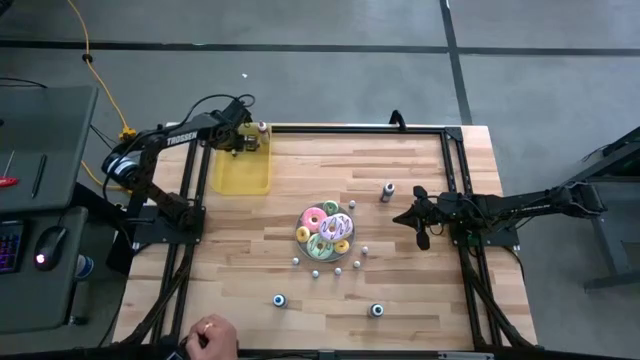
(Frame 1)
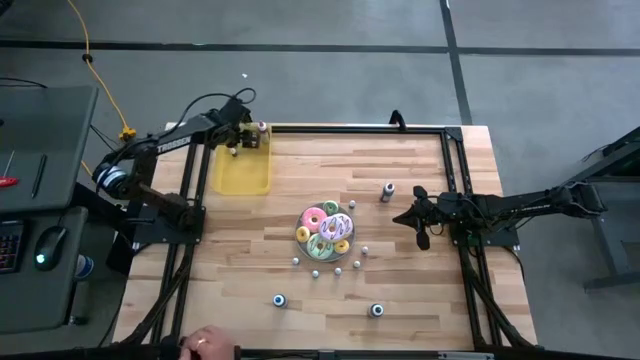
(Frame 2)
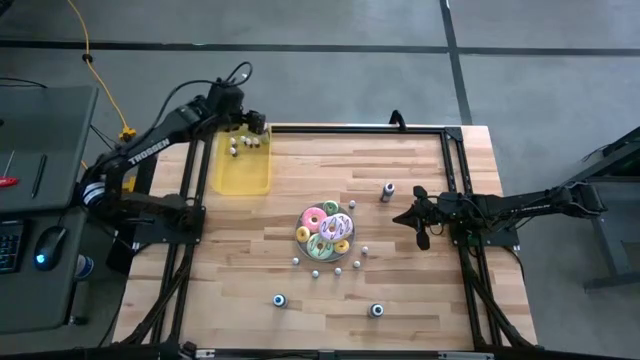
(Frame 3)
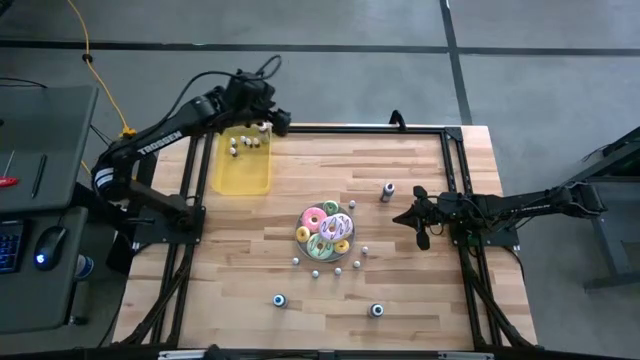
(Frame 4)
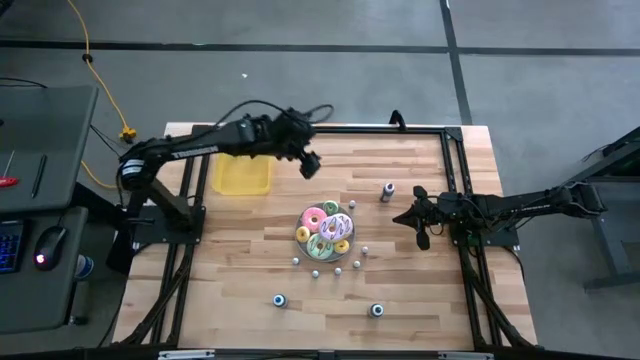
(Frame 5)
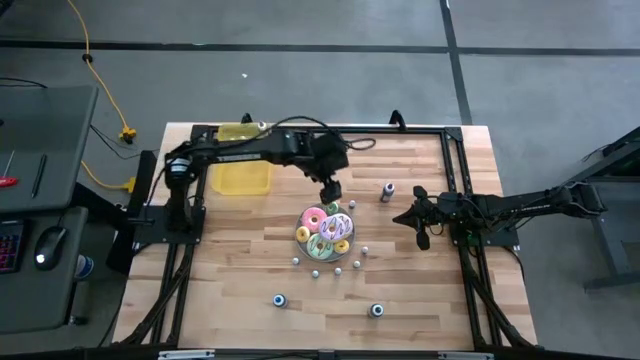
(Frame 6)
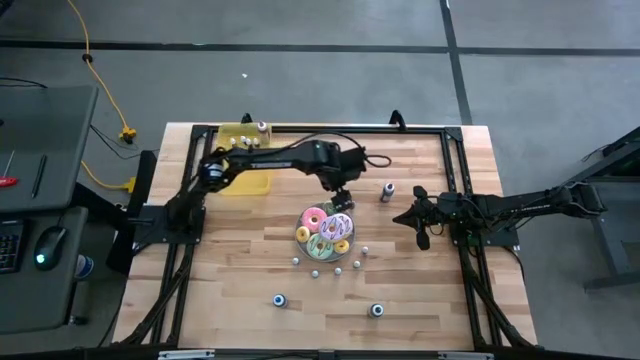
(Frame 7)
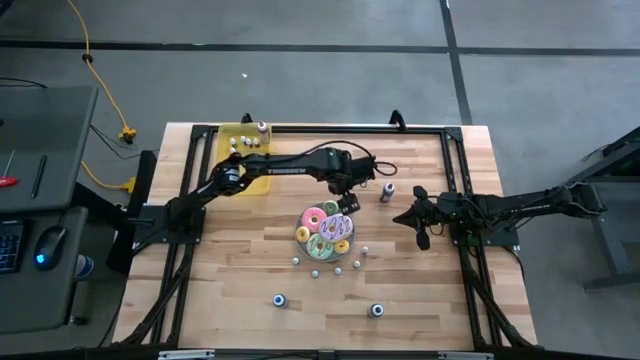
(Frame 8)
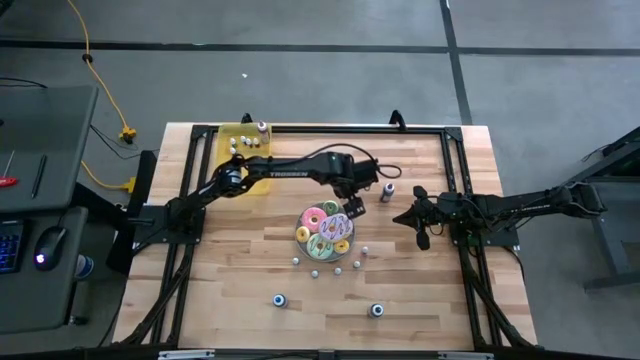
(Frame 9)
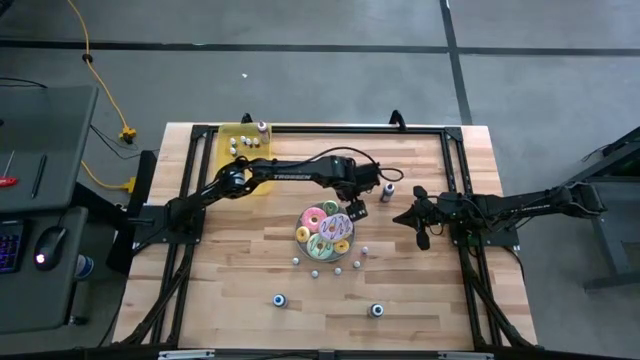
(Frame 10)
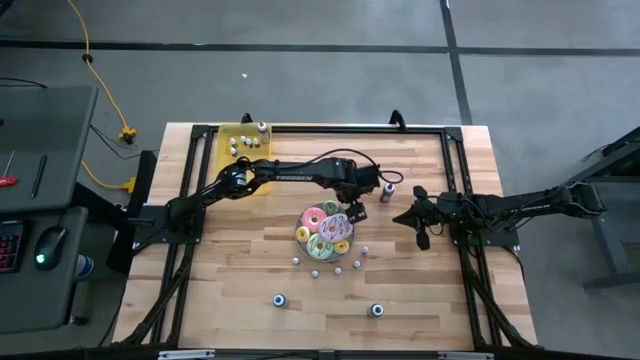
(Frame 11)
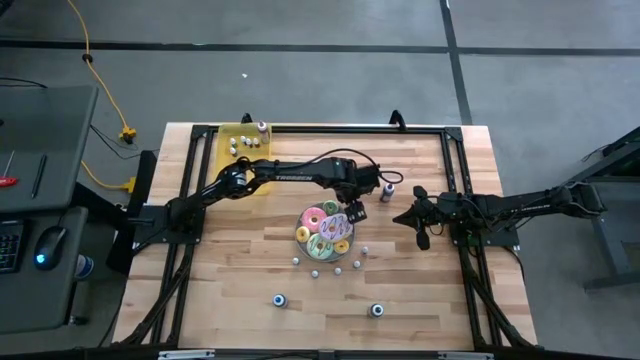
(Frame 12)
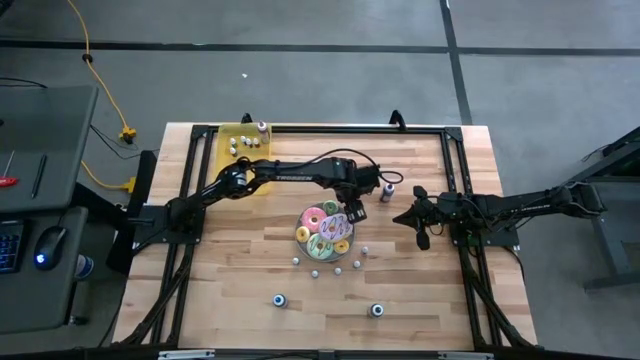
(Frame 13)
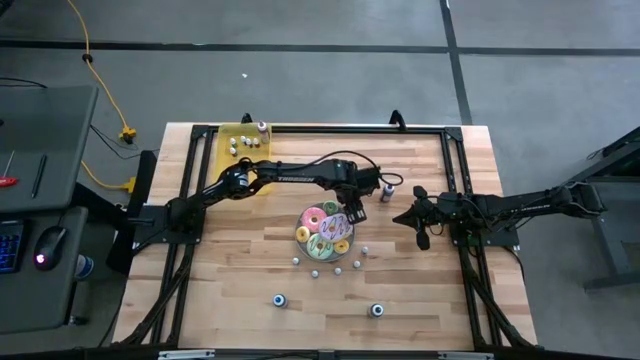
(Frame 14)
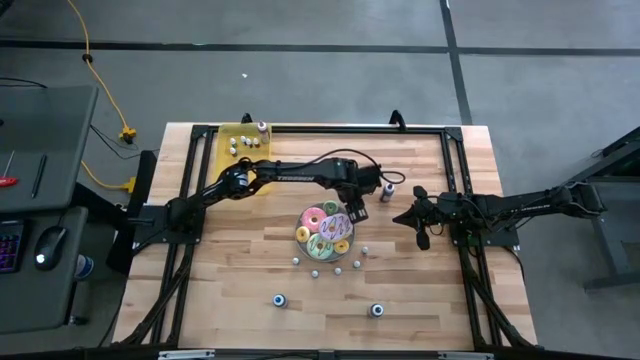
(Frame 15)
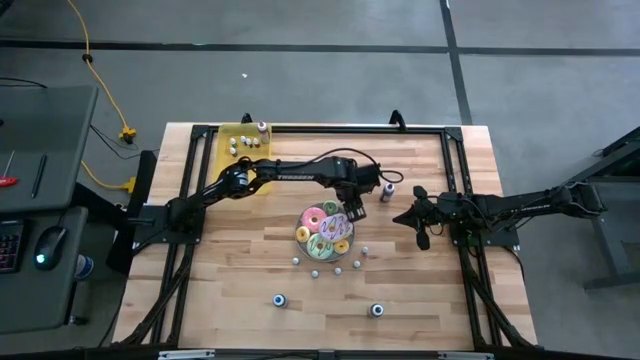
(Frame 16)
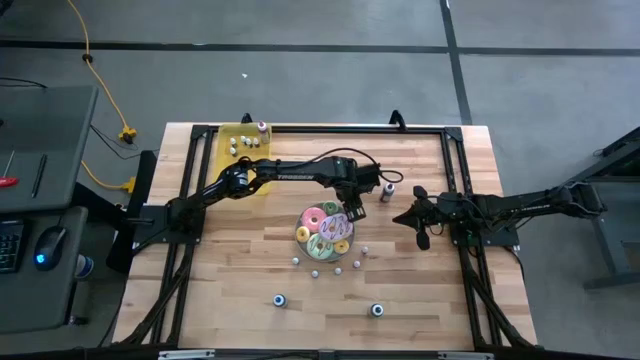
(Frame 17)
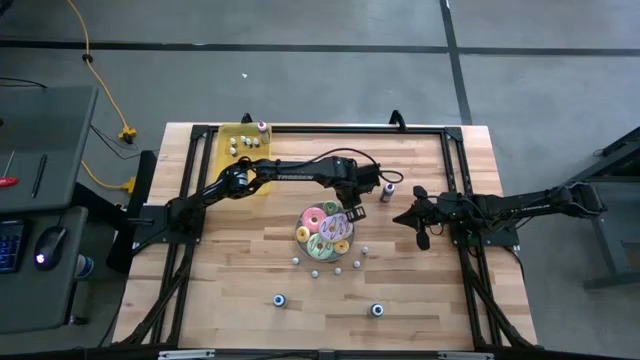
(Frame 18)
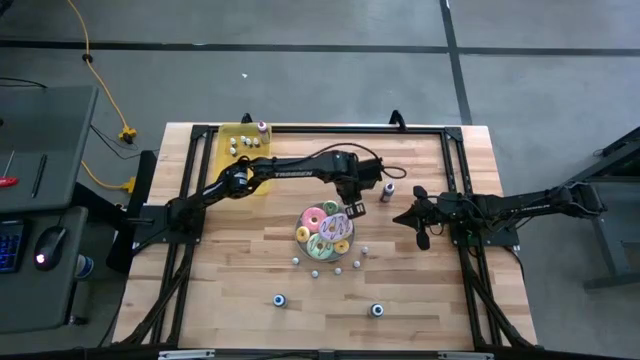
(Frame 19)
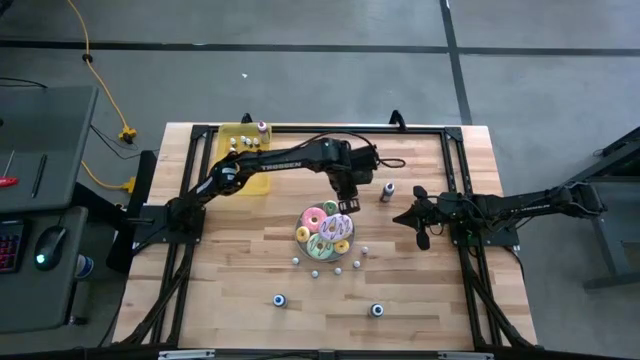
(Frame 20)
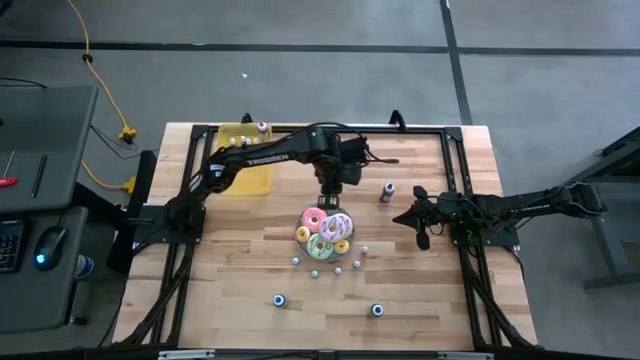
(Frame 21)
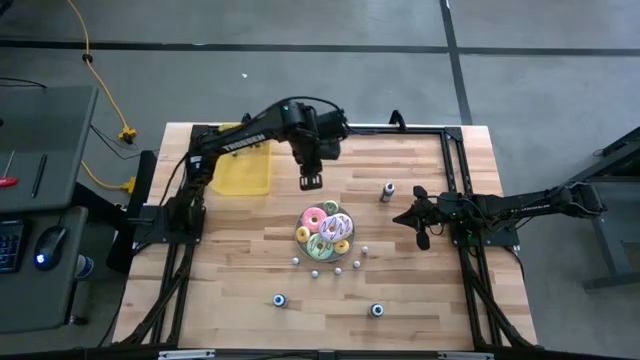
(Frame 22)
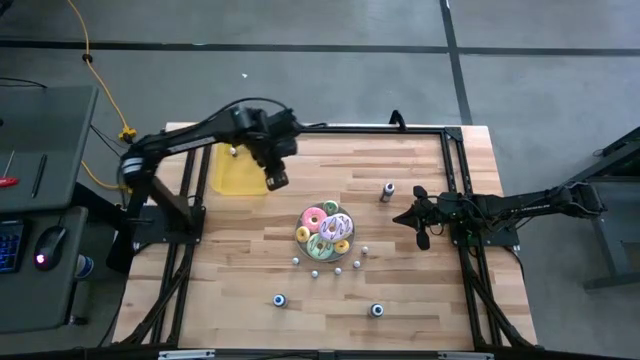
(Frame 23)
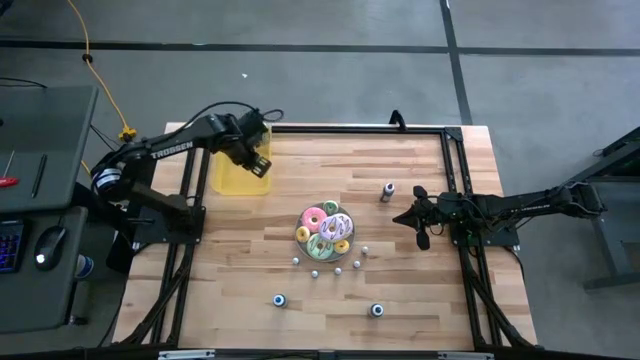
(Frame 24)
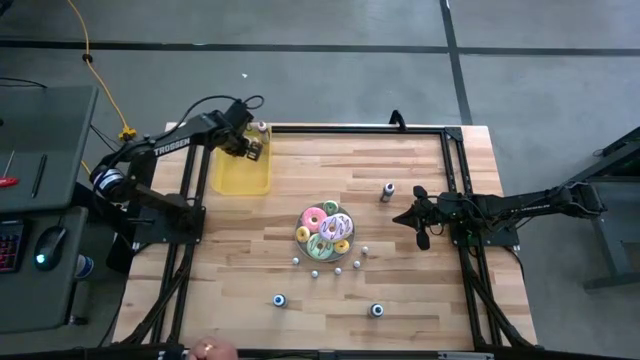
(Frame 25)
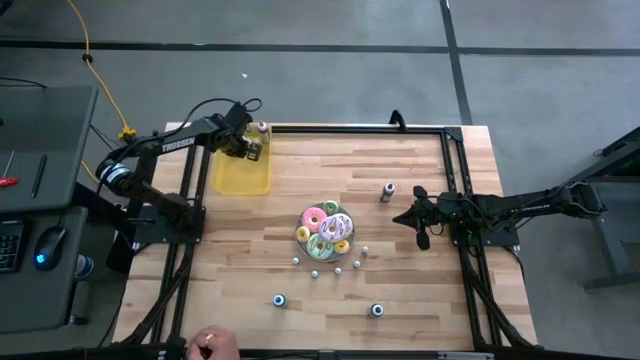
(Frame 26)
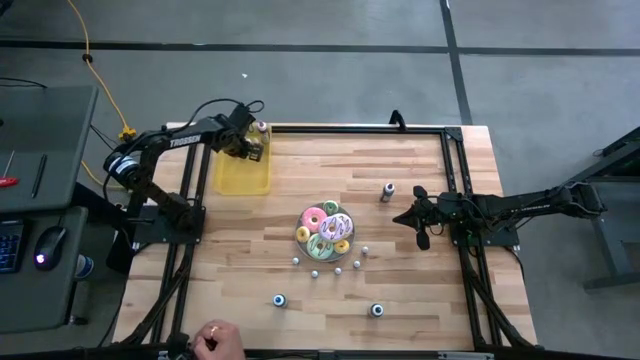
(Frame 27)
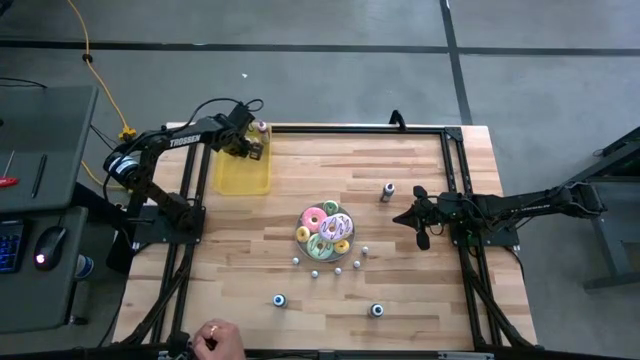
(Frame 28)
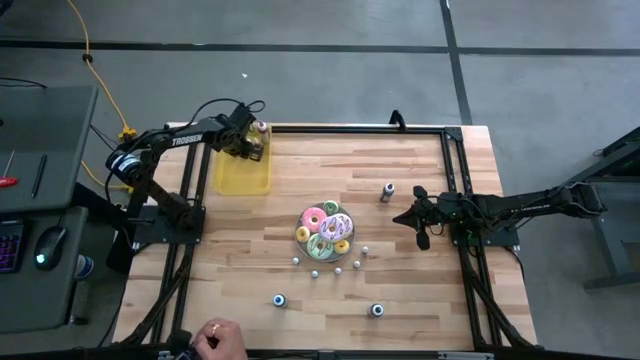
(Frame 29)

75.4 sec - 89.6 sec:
Task: Pick & Place food coloring
Put the small blue food coloring bottle into the yellow bin

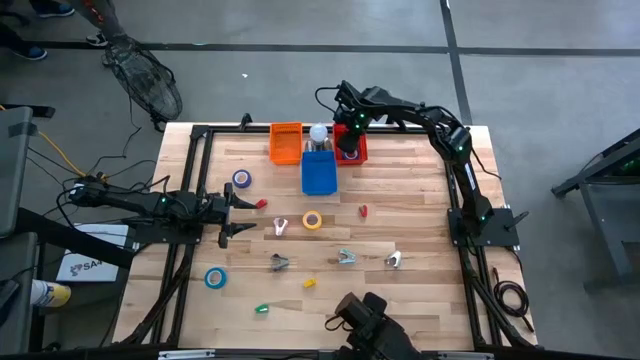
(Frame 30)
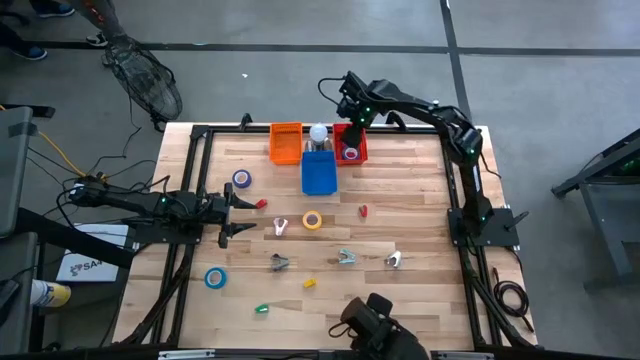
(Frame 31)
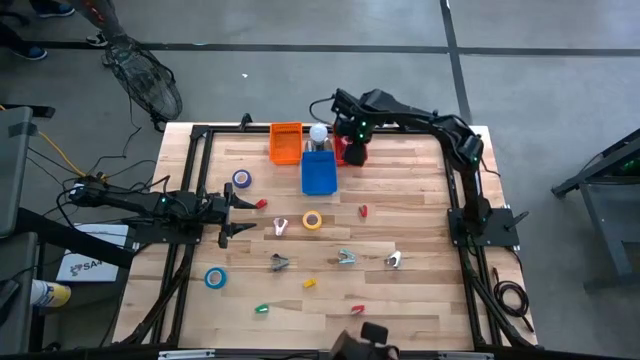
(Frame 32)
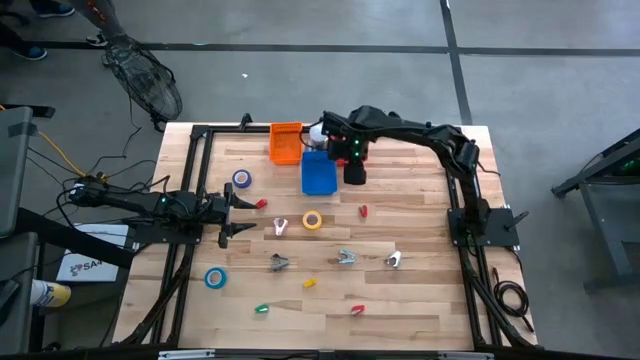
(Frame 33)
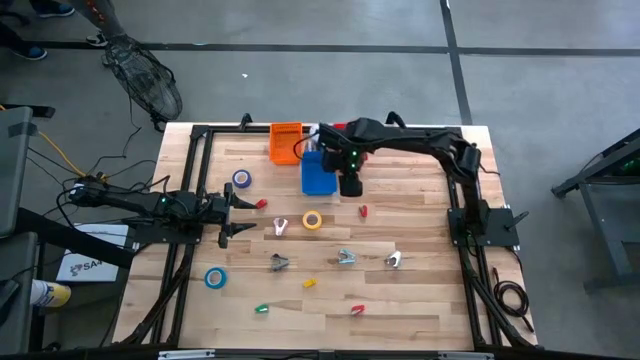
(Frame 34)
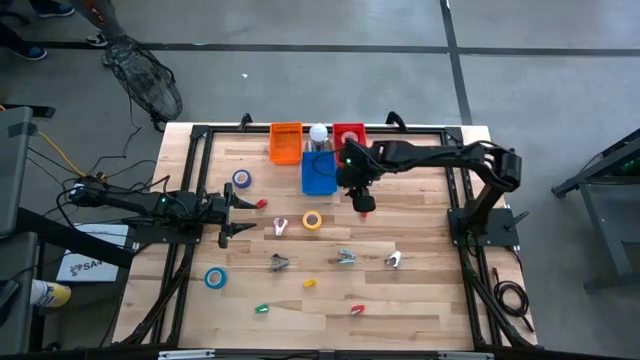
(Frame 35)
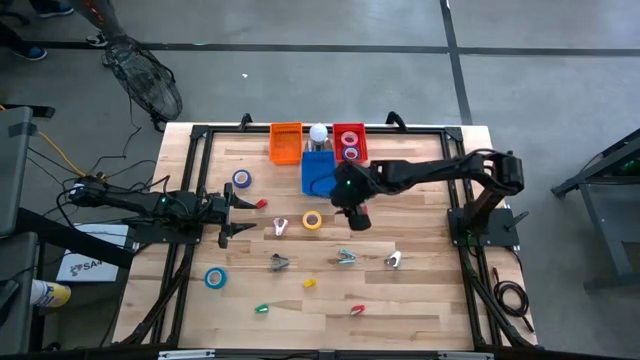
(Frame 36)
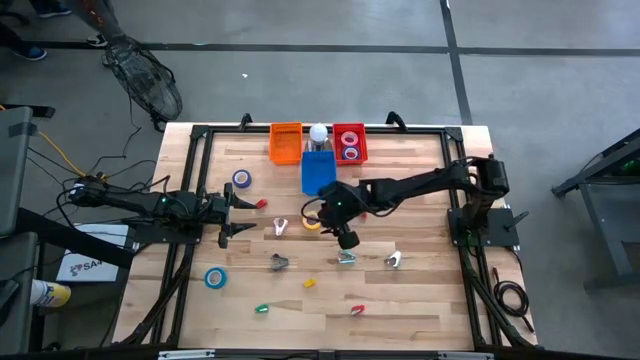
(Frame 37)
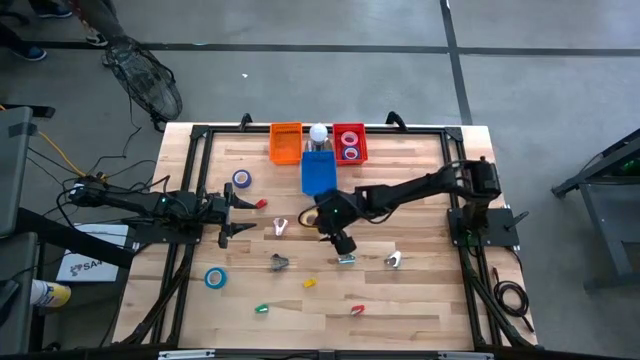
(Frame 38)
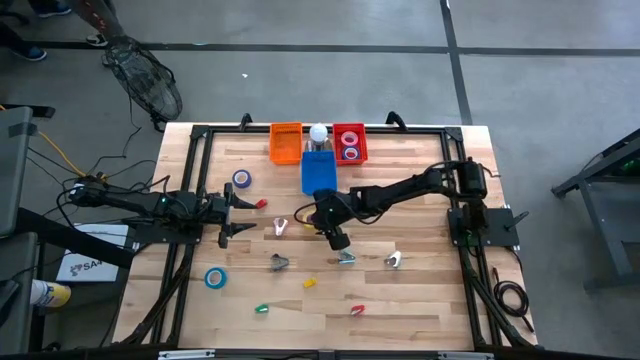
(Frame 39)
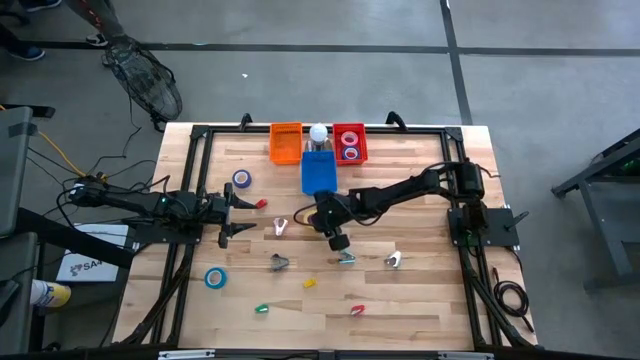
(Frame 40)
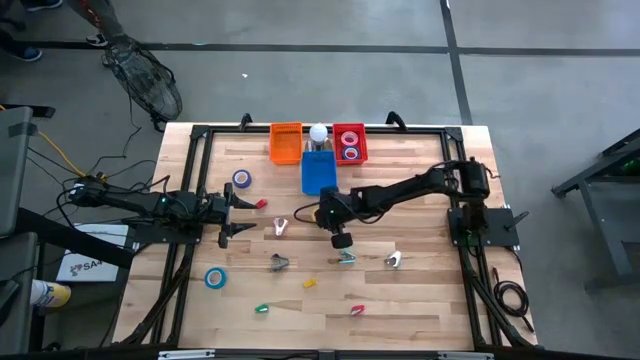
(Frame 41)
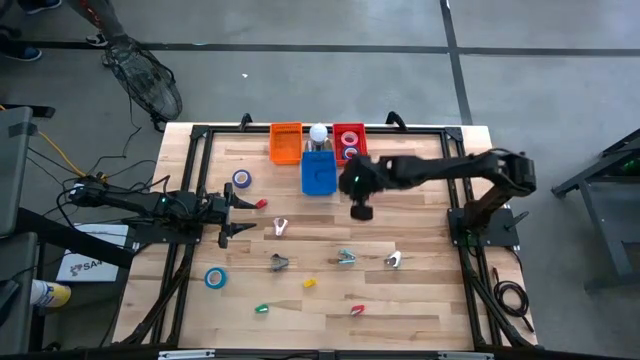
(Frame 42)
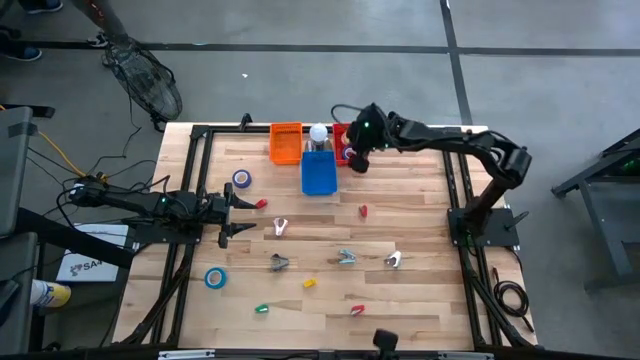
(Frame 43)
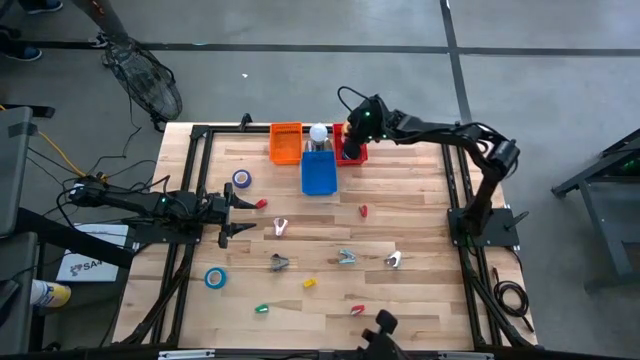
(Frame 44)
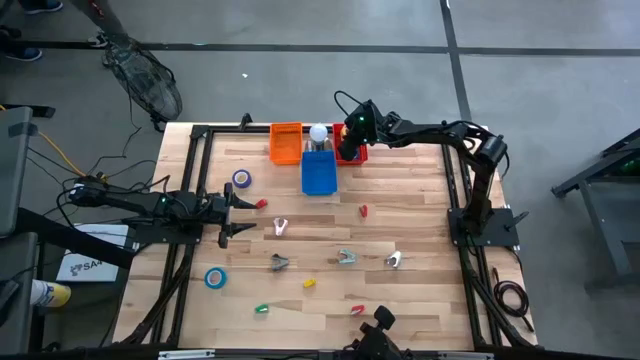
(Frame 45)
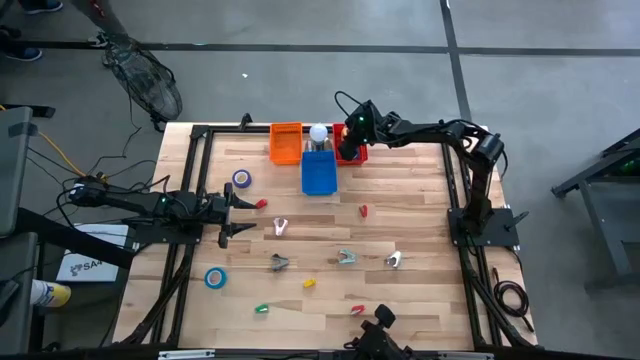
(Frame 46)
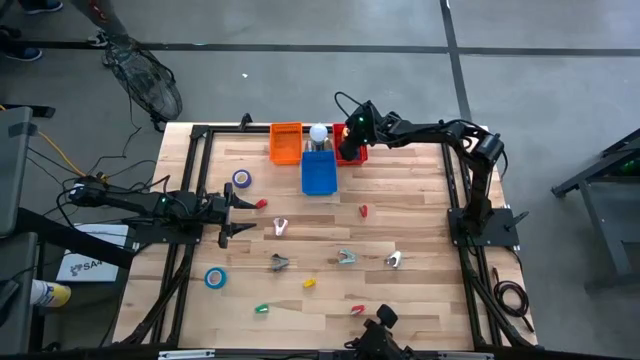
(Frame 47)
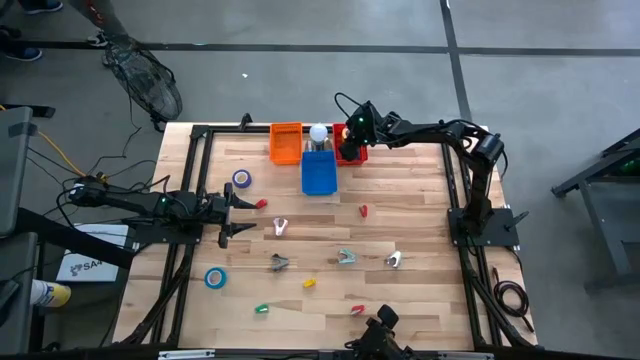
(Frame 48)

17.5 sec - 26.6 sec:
Task: Pick and place Stapler, Stapler remover, tape
Put the yellow tape into the red basket
